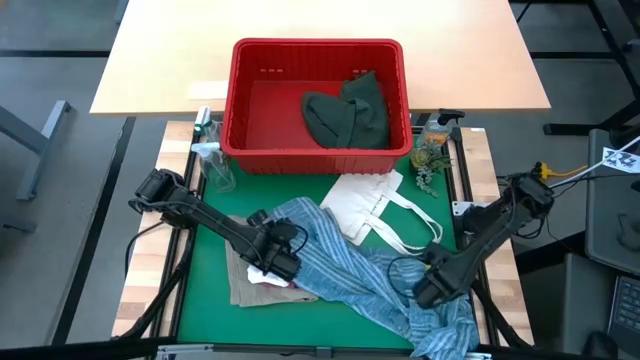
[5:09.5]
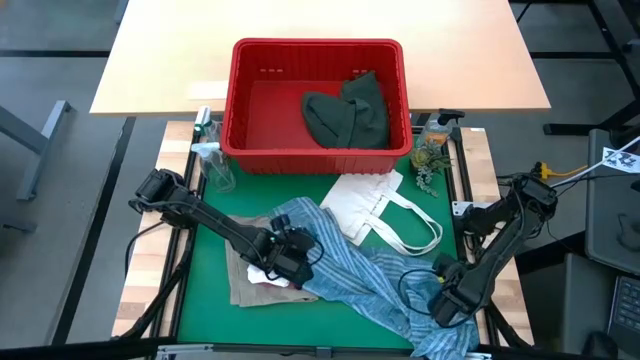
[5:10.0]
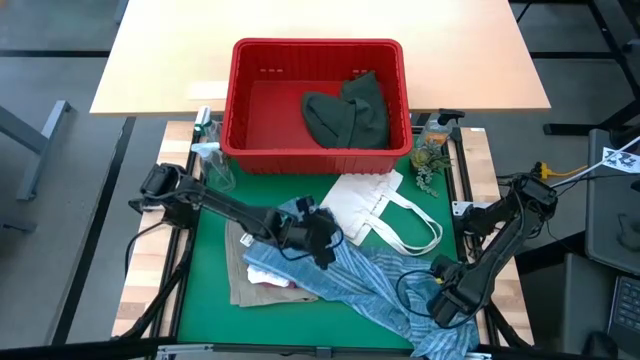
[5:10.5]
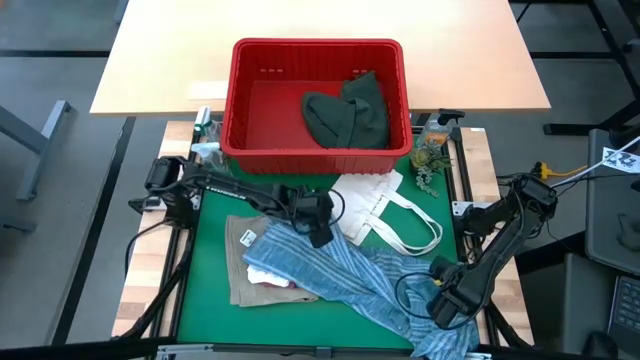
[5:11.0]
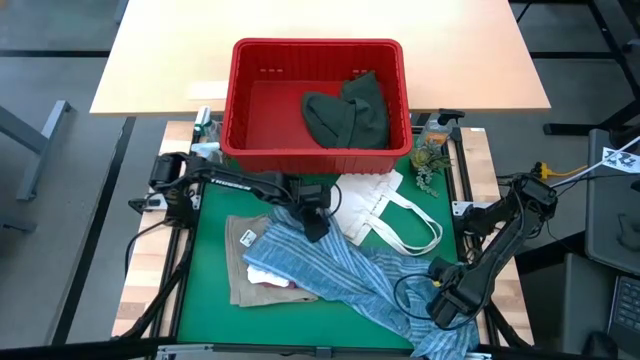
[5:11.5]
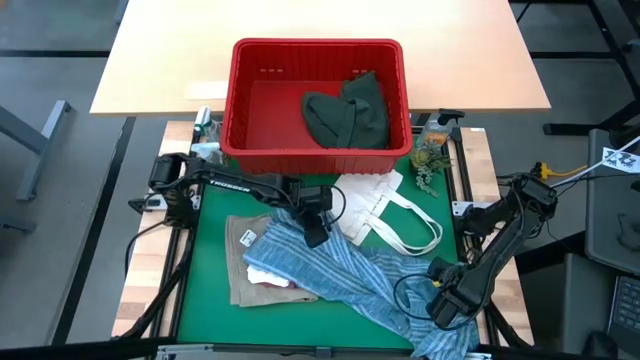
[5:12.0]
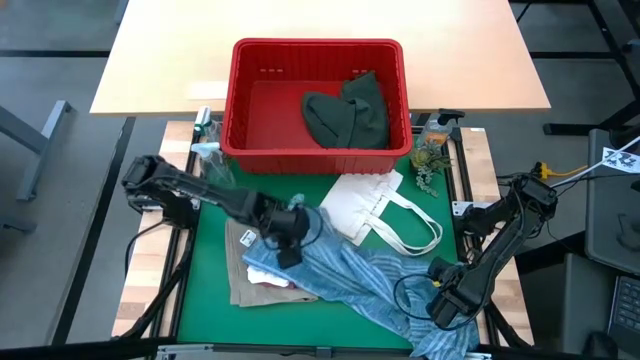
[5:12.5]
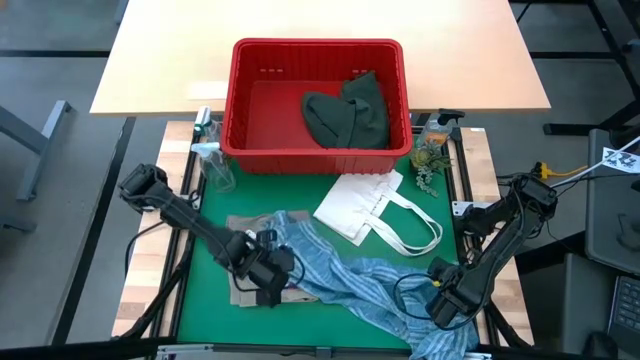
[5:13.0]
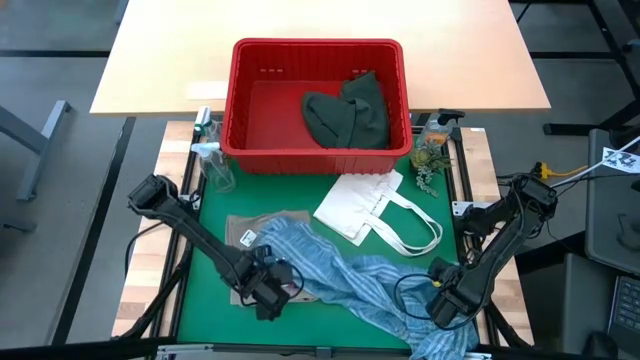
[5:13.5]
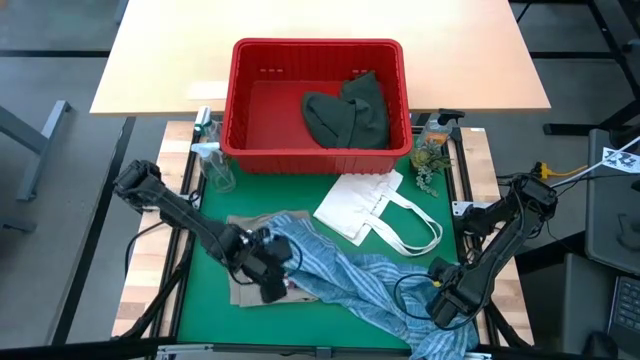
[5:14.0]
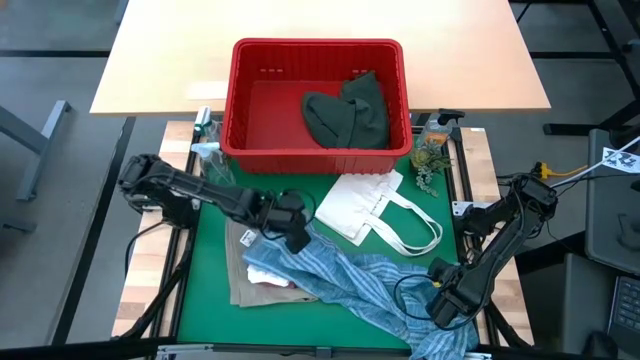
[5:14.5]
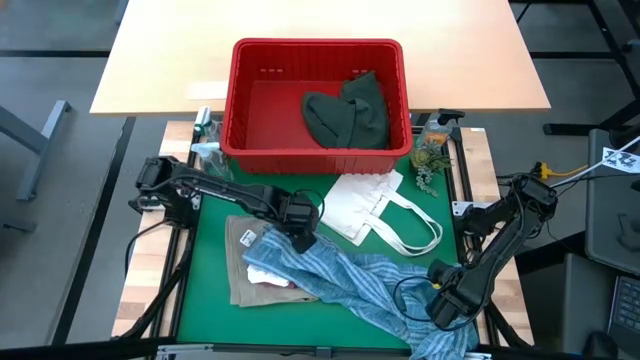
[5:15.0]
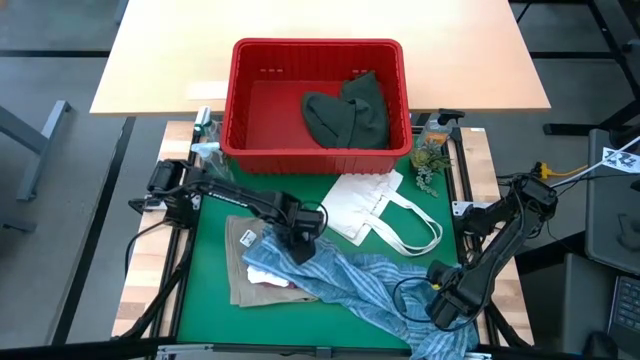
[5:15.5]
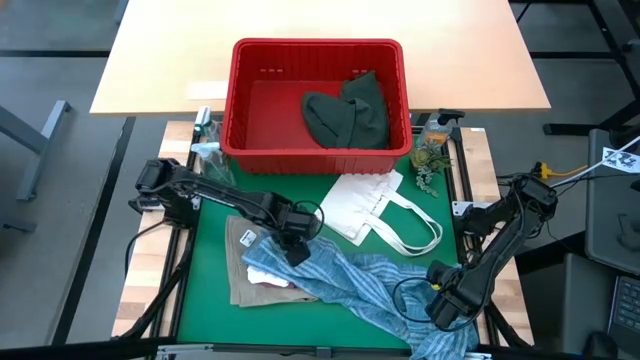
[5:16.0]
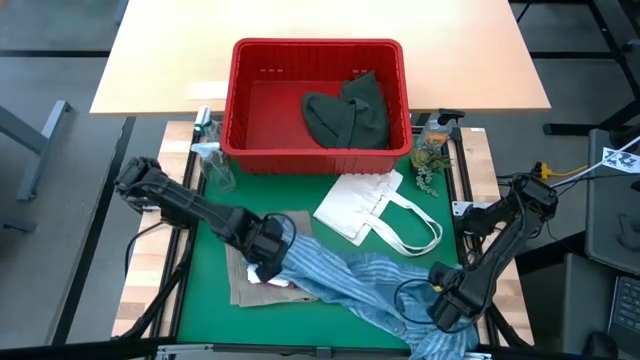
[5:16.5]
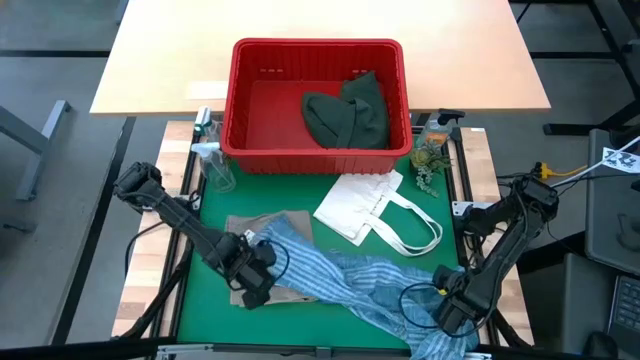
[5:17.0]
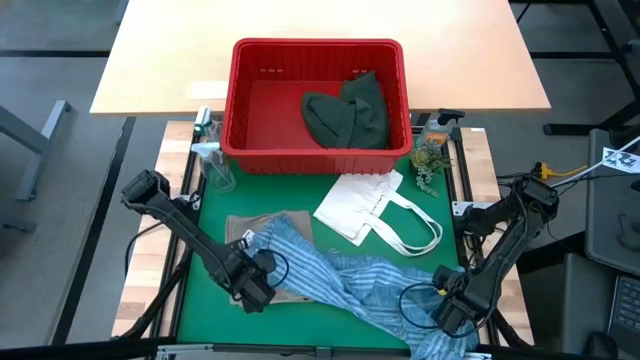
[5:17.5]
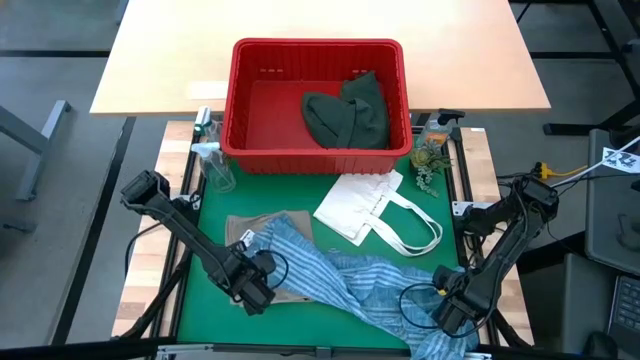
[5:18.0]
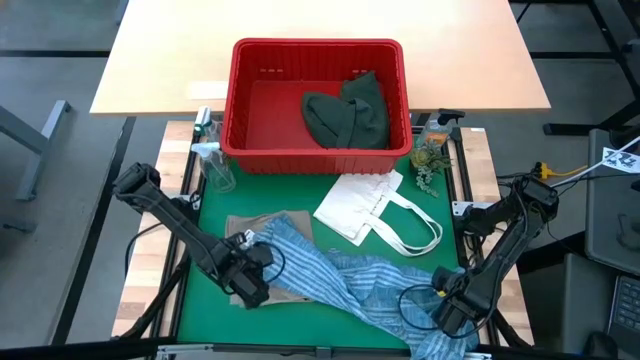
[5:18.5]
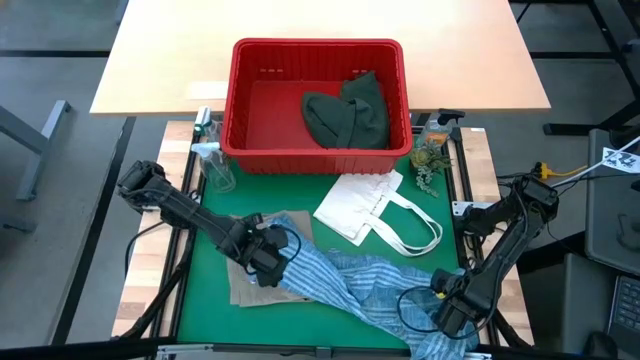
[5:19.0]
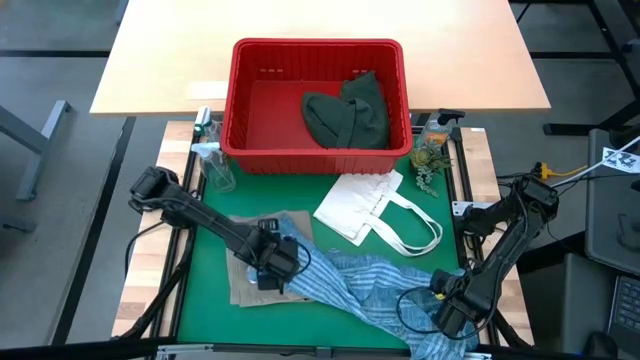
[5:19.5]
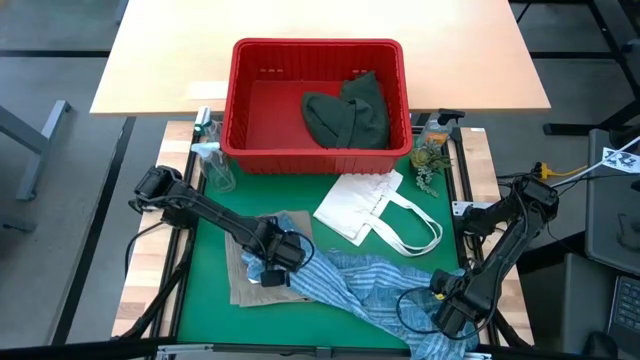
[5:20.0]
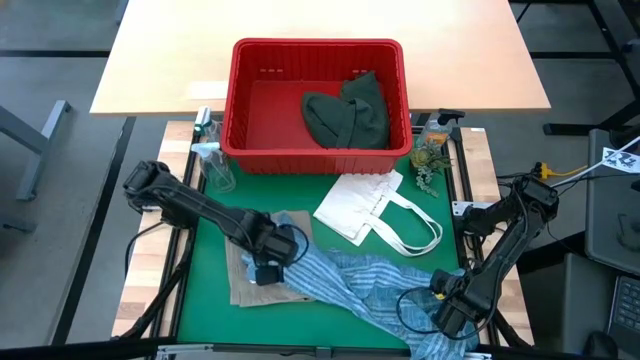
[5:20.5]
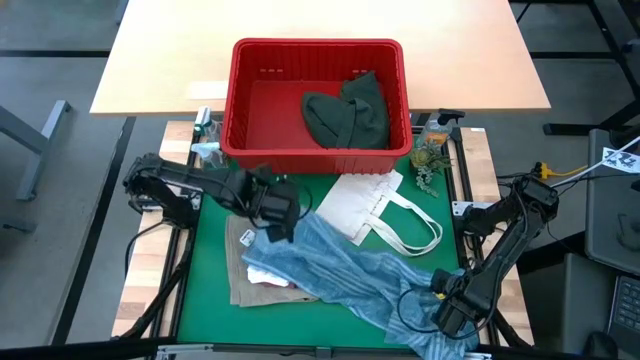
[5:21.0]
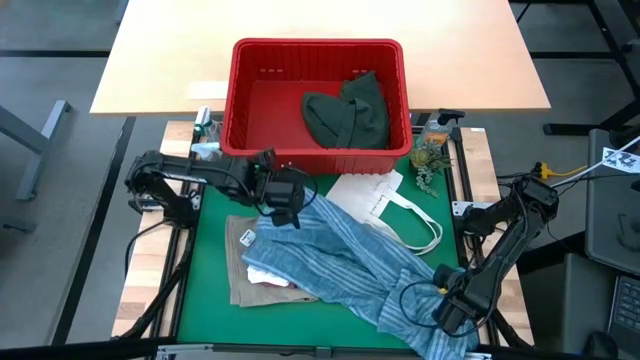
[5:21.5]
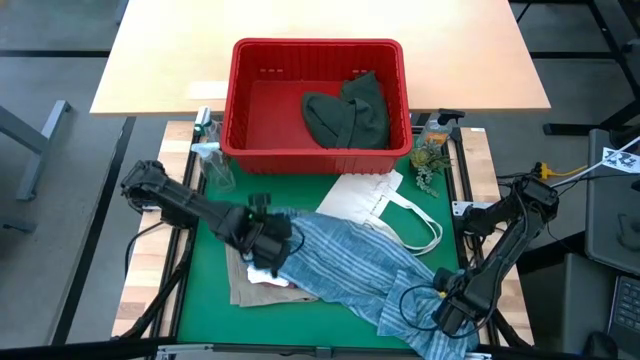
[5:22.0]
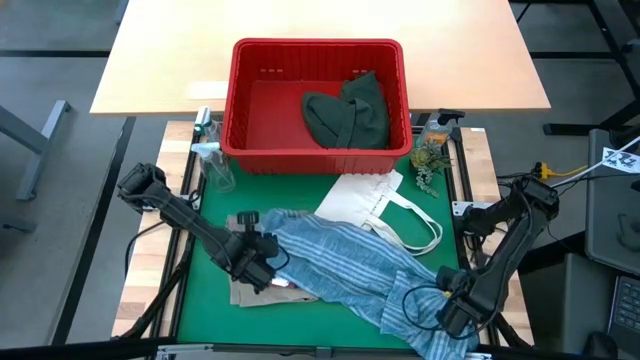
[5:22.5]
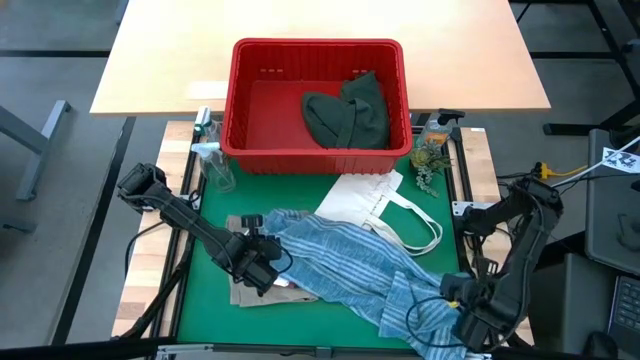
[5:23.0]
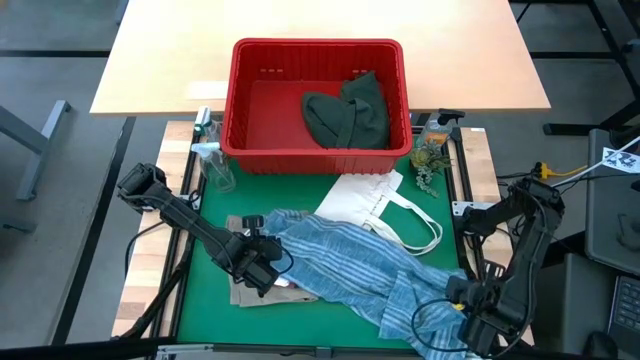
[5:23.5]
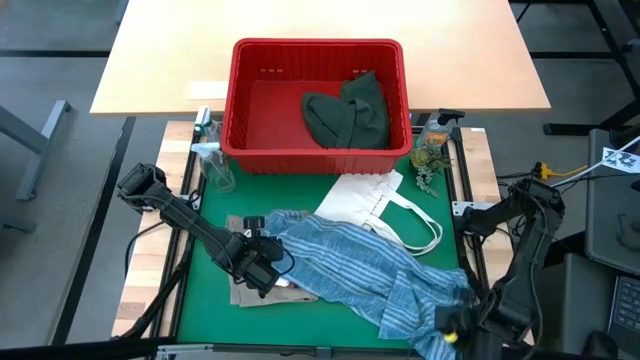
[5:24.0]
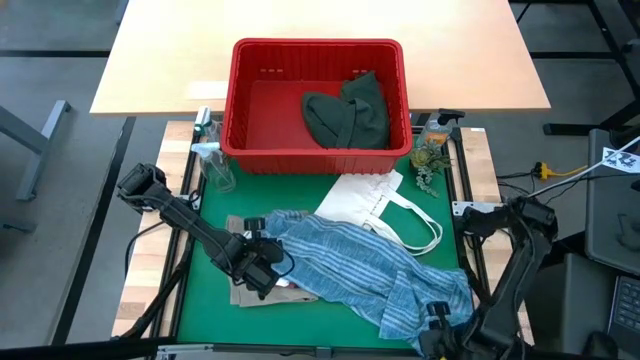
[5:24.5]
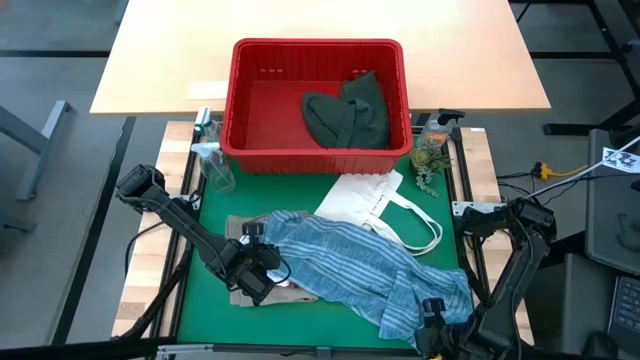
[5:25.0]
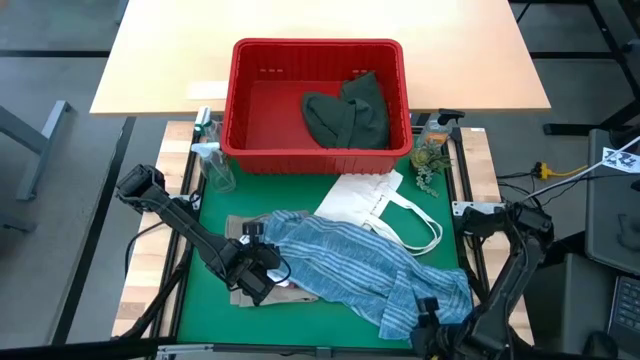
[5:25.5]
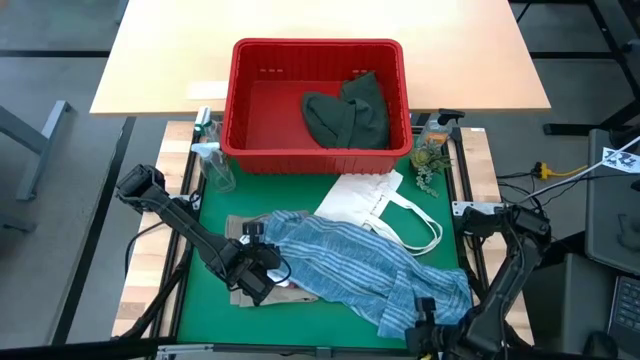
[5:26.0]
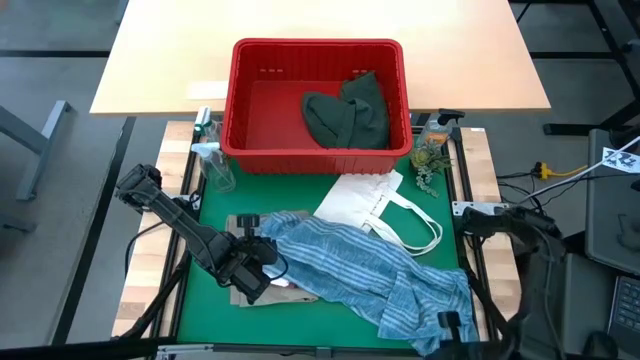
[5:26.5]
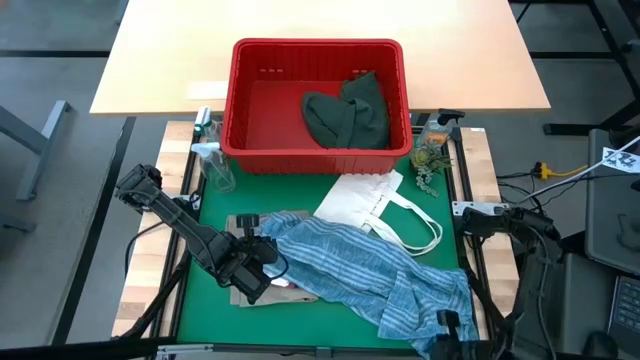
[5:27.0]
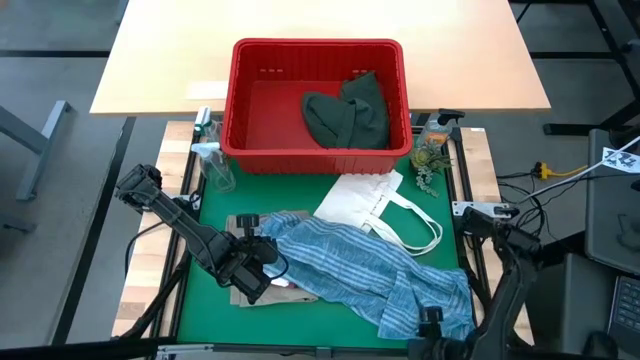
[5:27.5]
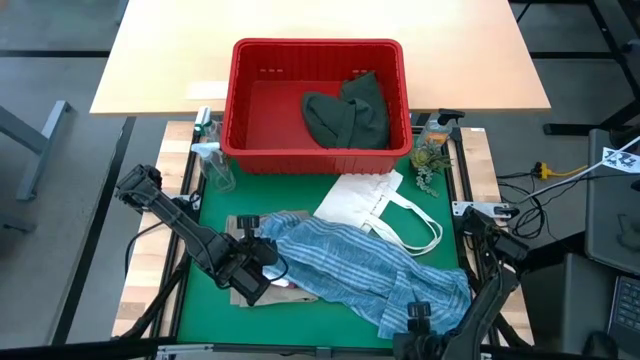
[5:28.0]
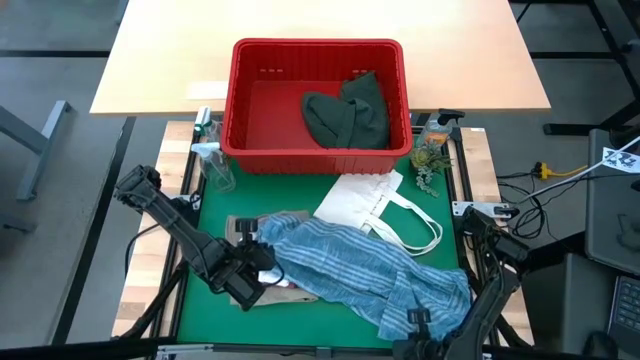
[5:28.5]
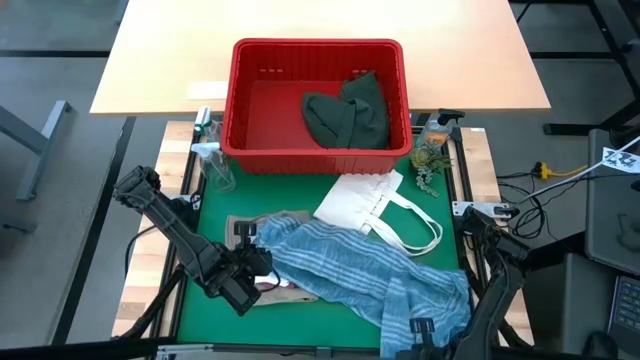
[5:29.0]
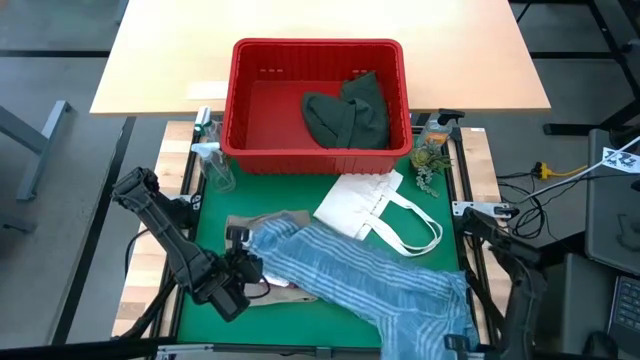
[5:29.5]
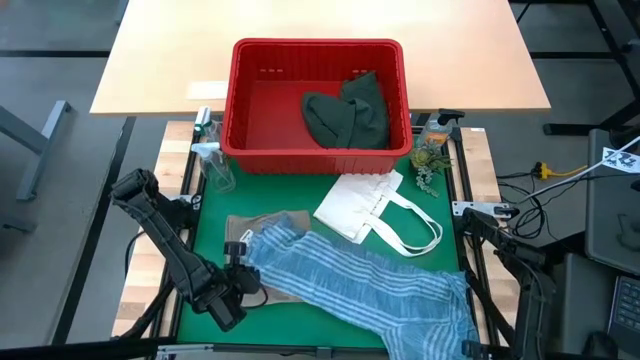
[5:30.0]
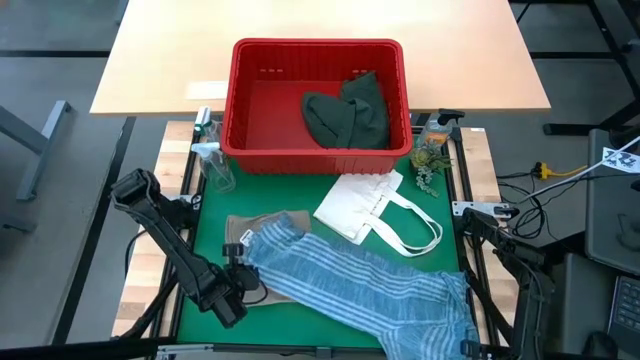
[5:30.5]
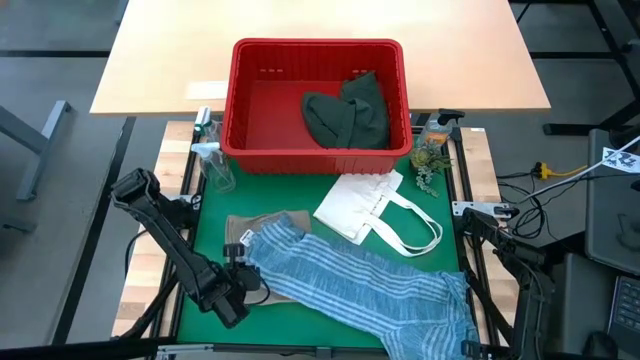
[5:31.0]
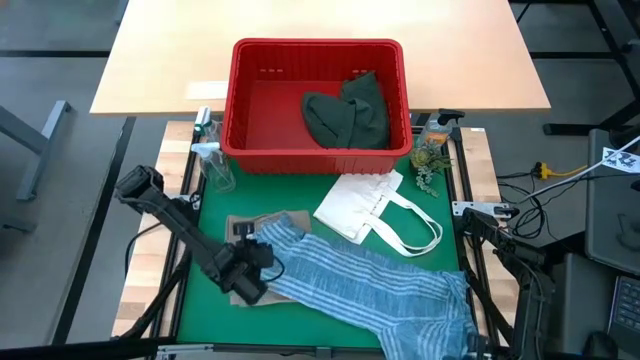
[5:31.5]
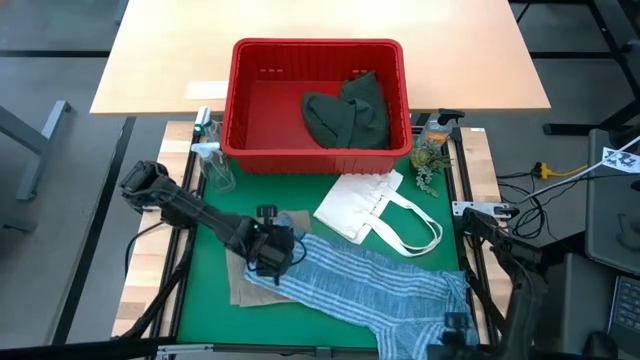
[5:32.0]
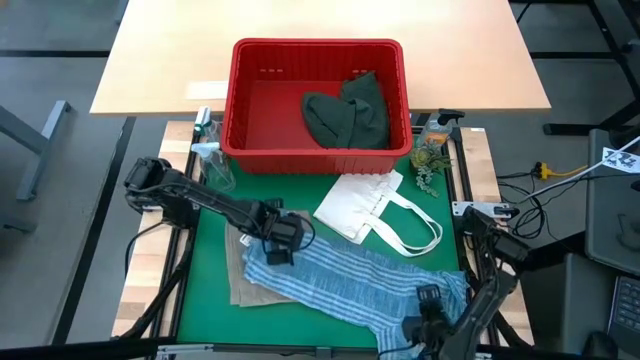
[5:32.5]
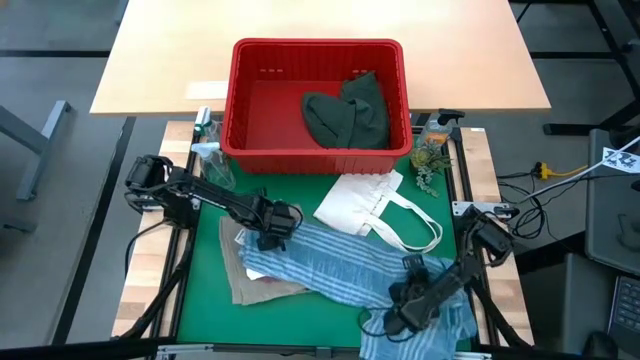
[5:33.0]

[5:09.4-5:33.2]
Task: Fold Laundry from Bin
Fold the blue polo shirt
